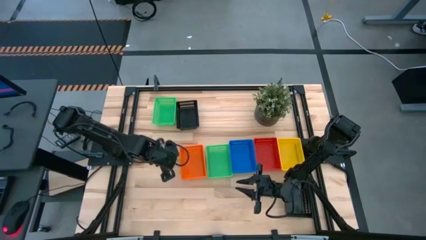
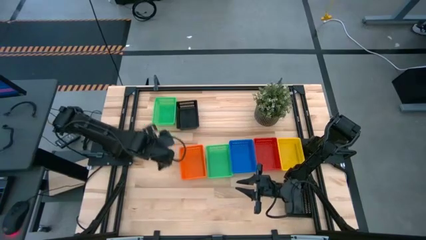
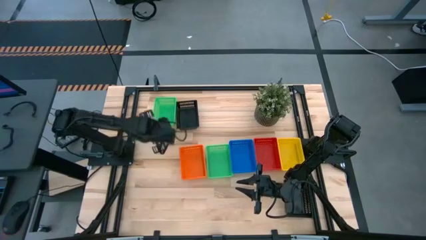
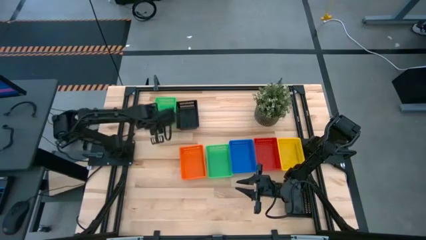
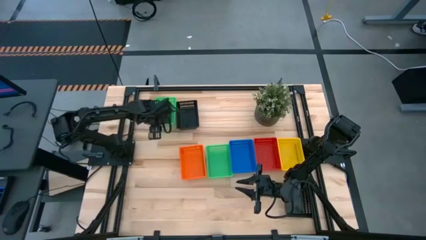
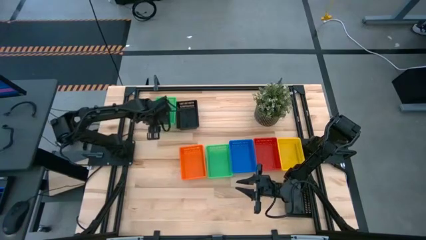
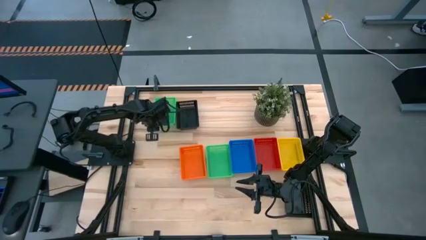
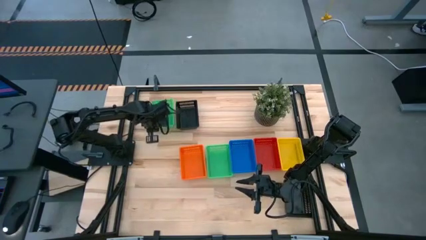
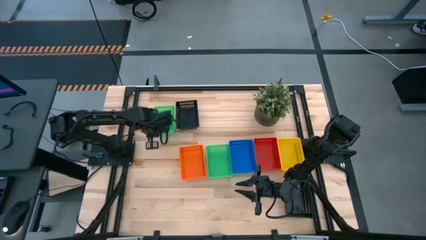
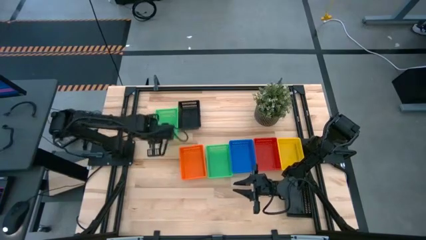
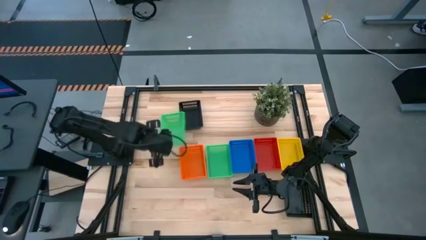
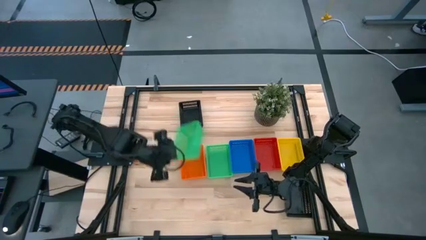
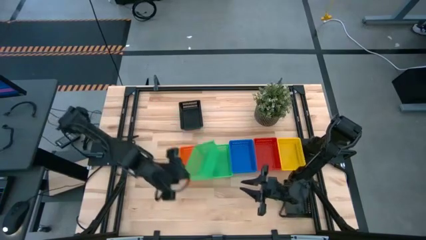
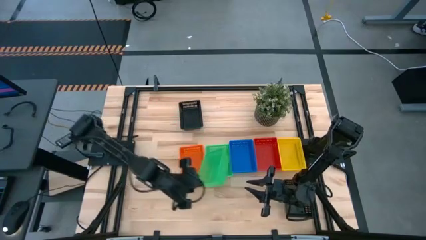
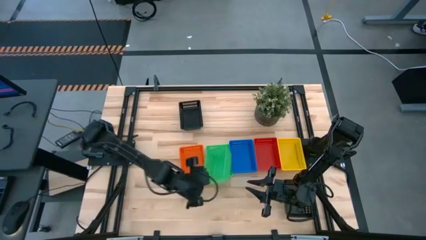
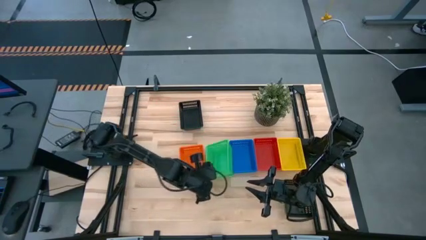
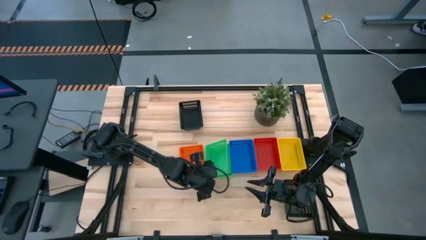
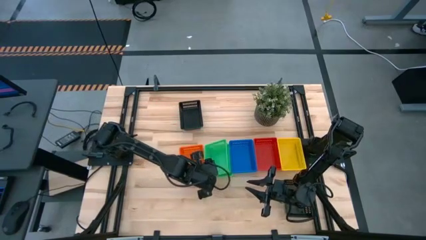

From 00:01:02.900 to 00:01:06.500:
Stack the top green bin on top of the bottom green bin

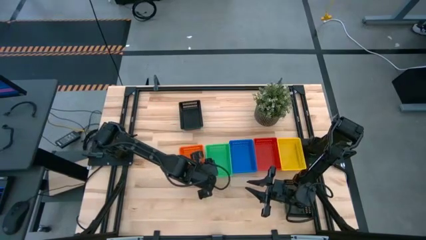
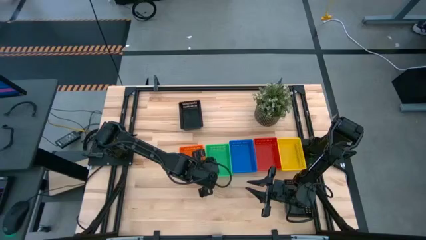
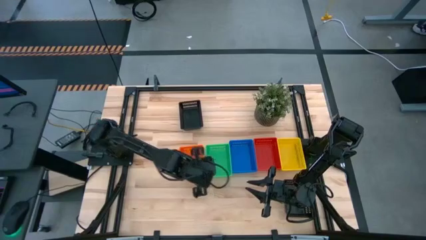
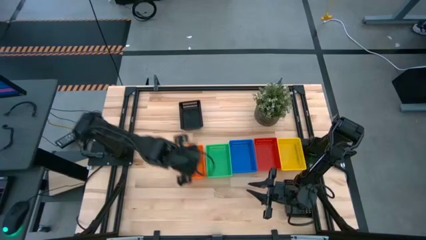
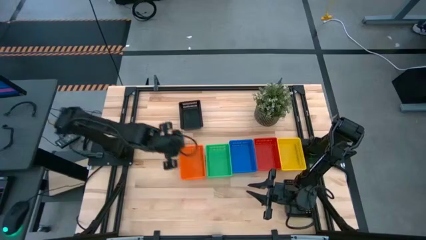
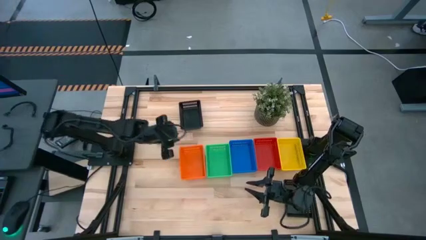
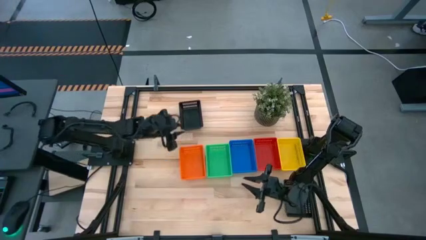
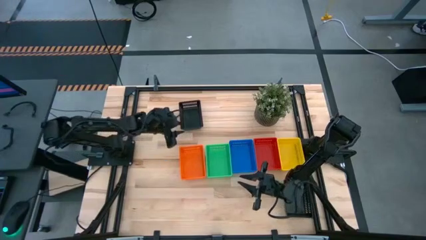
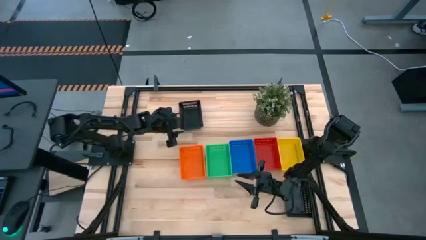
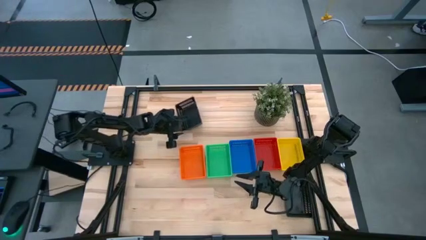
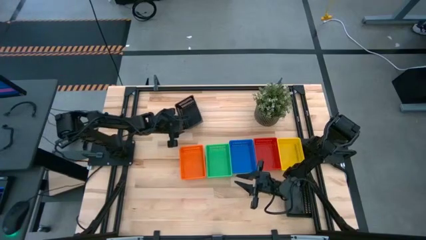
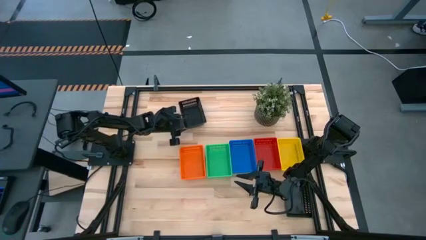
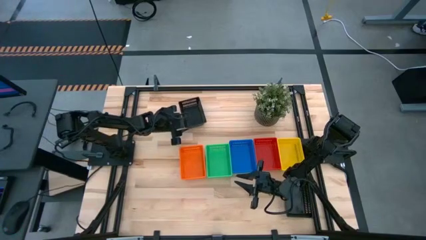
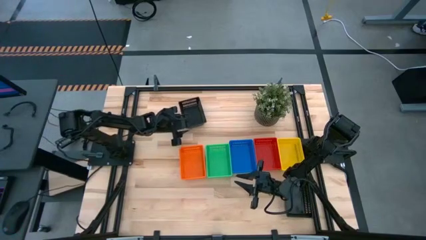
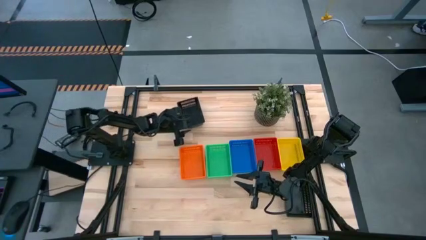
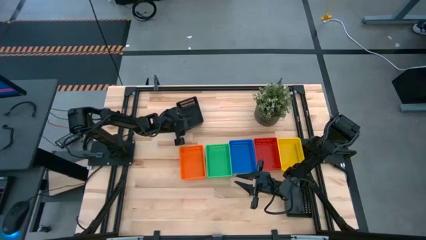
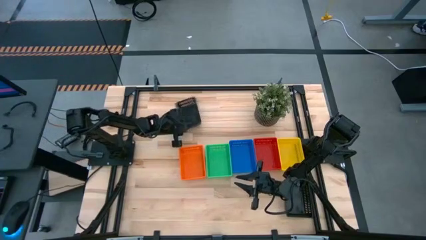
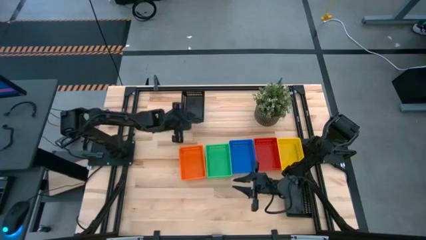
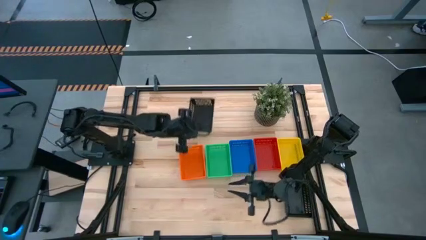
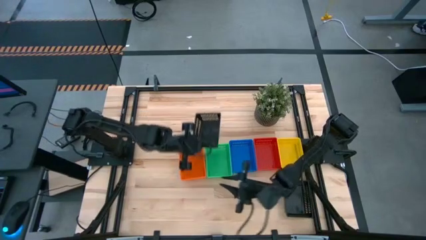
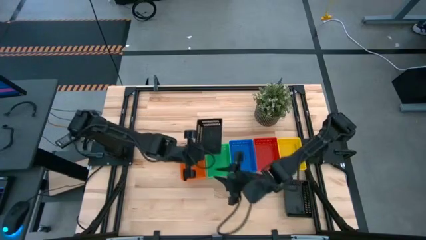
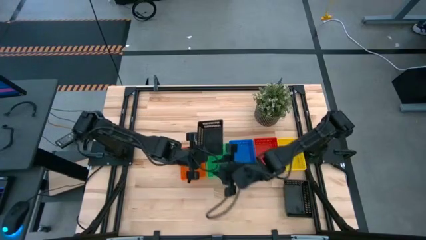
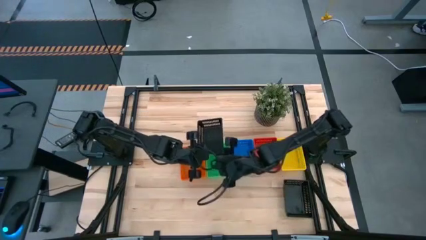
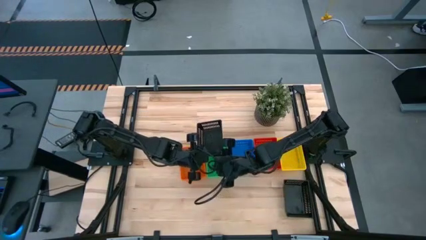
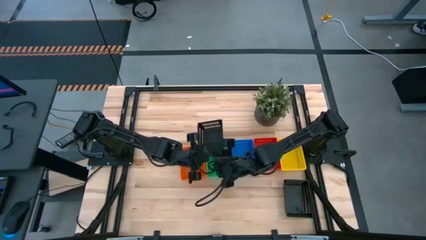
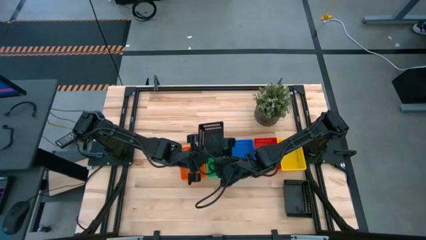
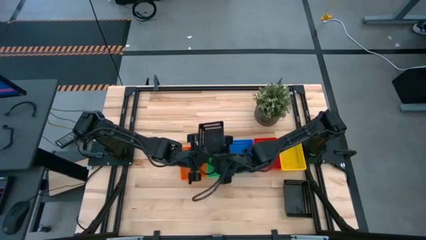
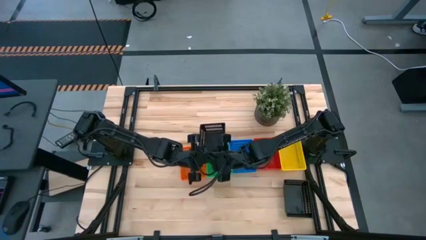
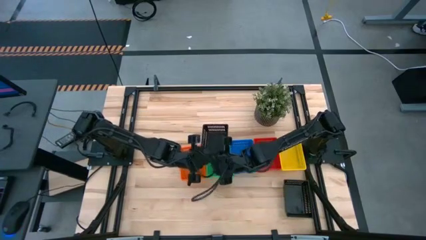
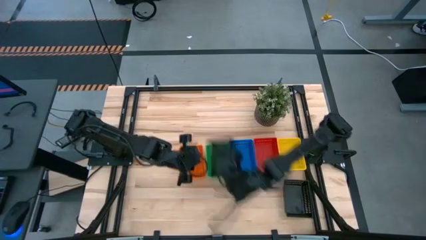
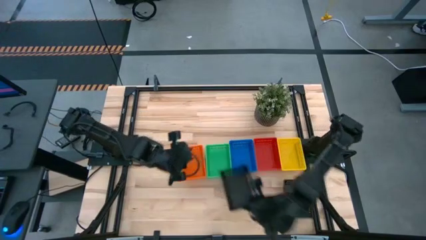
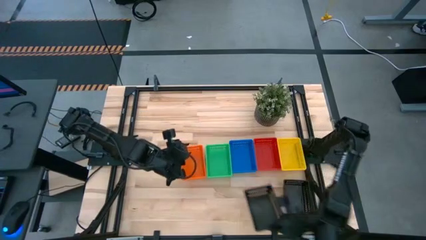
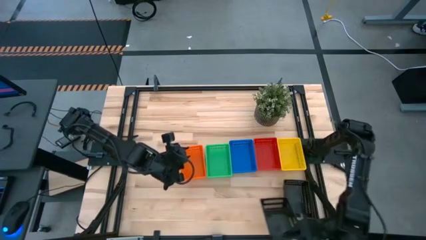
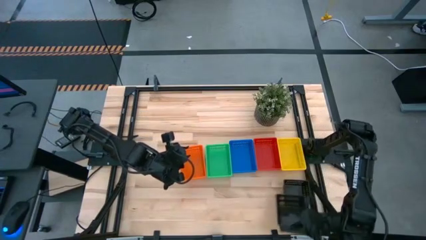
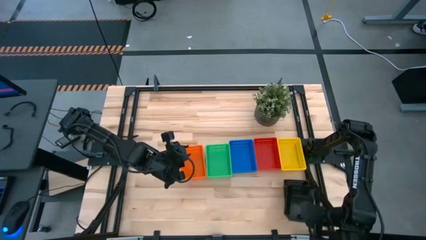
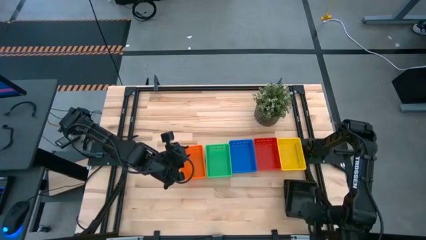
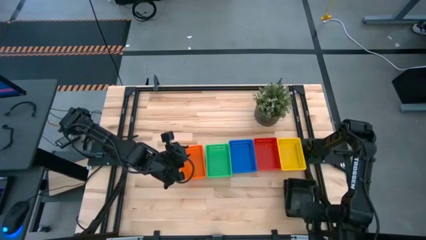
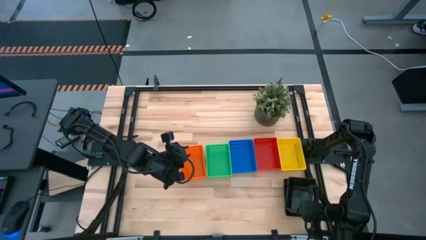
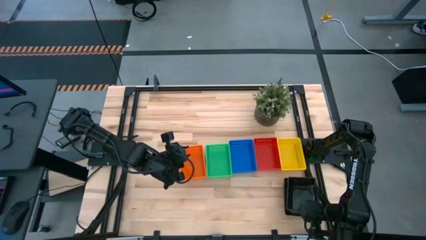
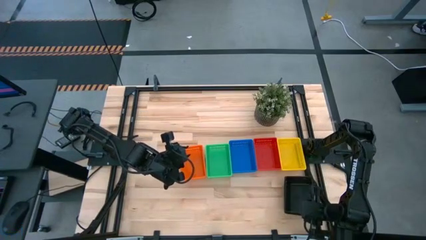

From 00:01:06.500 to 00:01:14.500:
Stack the top black bin on top of the bottom black bin

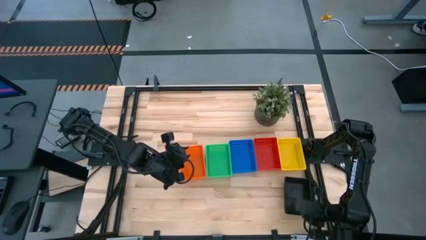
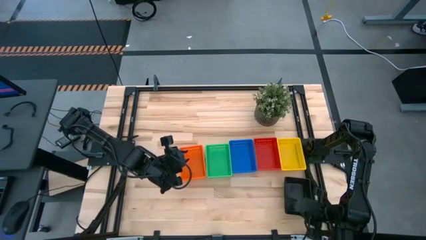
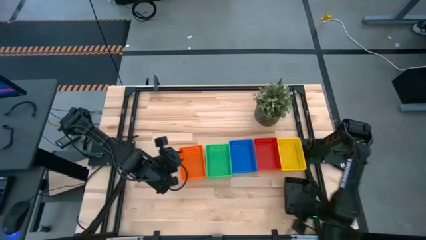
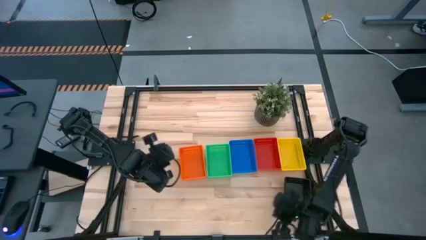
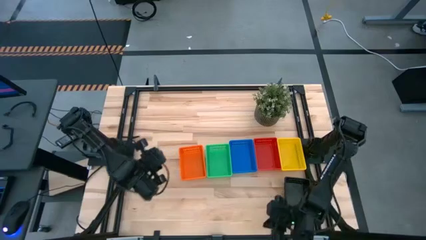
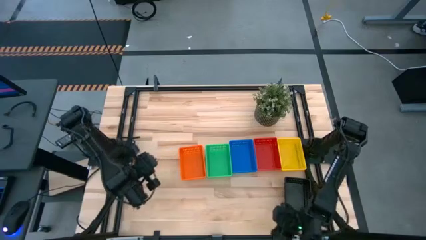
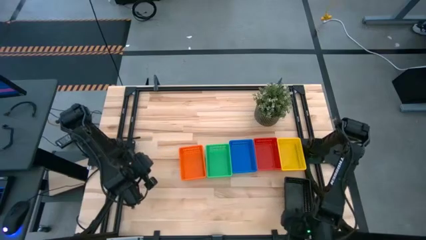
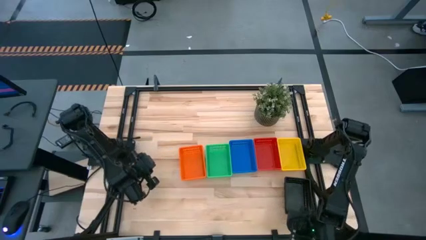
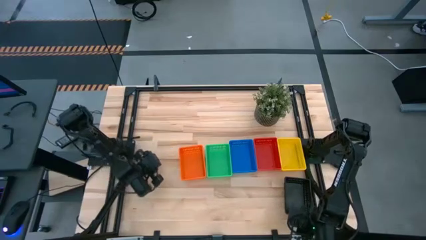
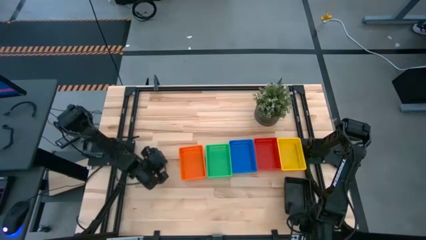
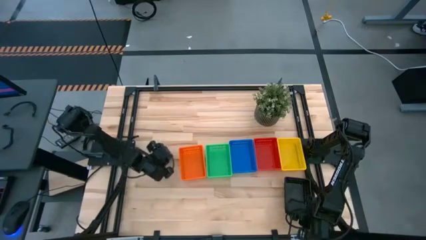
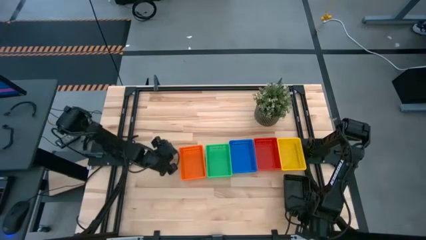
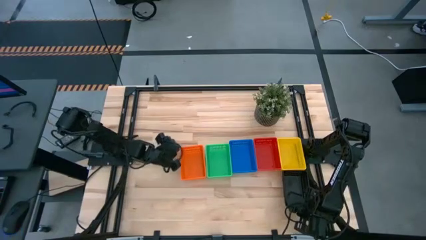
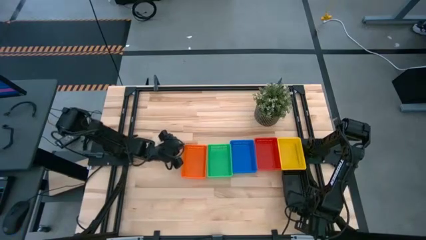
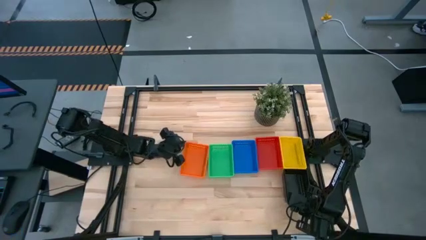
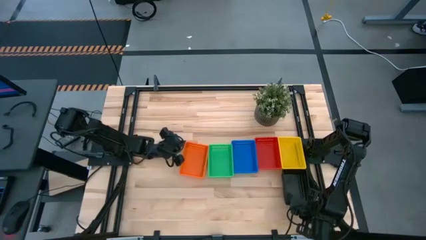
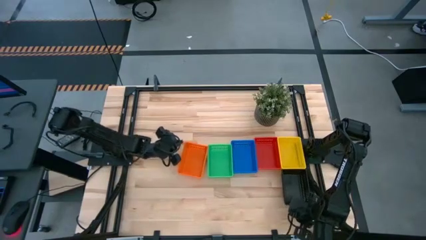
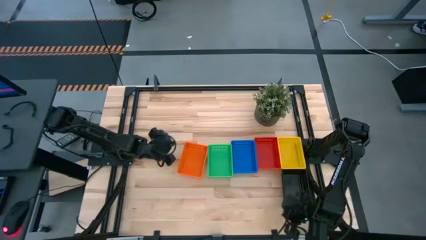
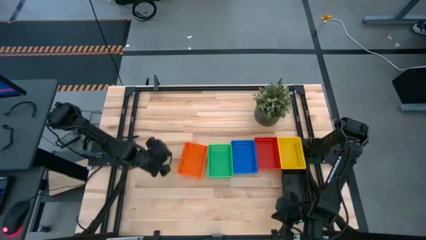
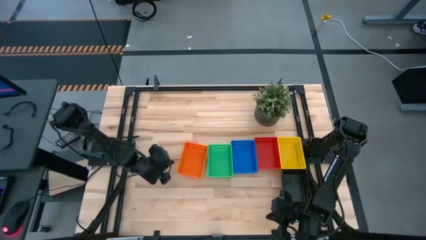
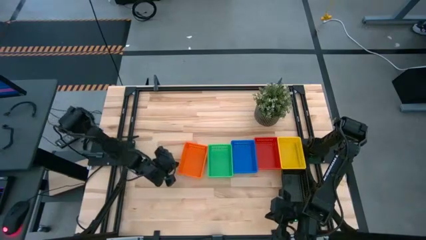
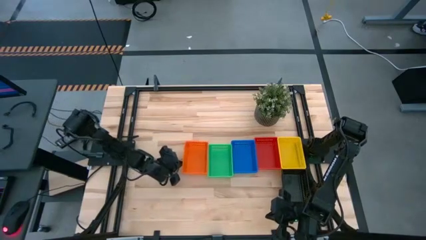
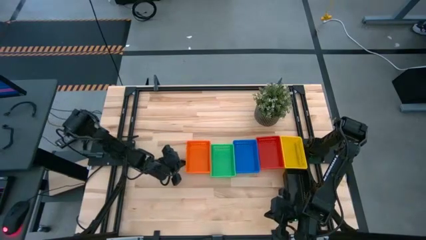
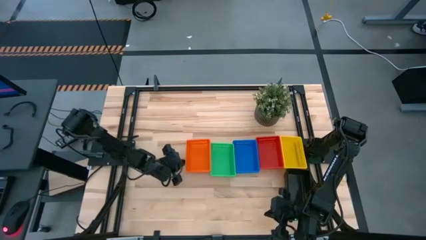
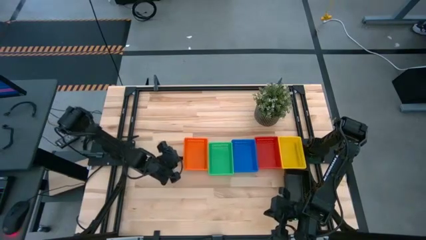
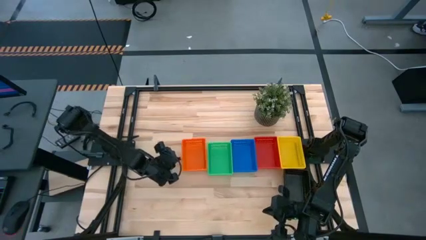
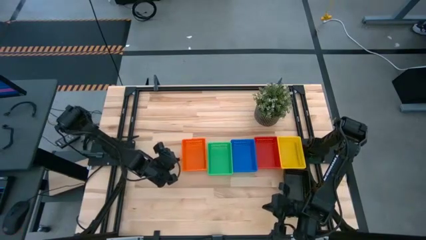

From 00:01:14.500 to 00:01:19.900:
Adjust the bins
